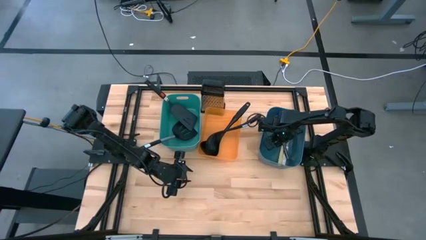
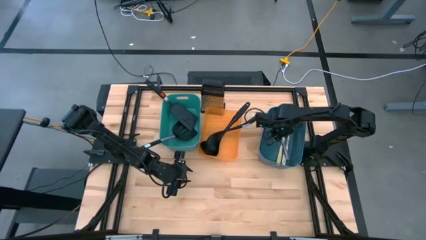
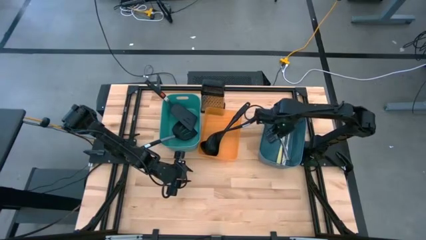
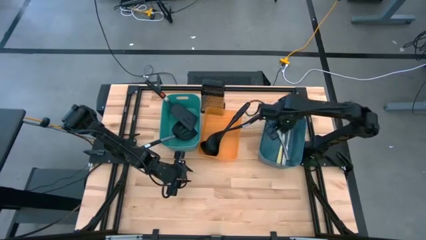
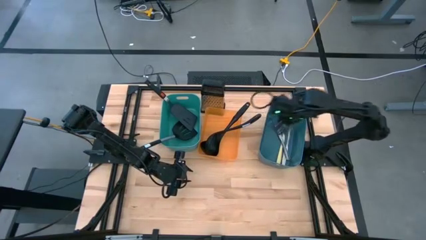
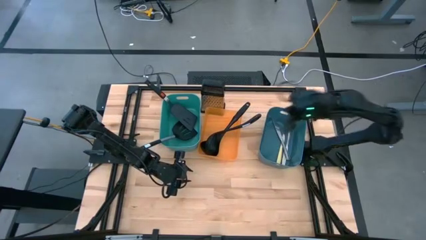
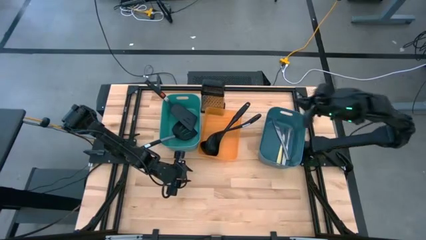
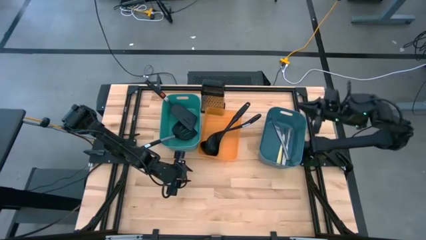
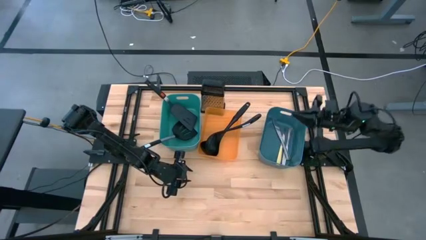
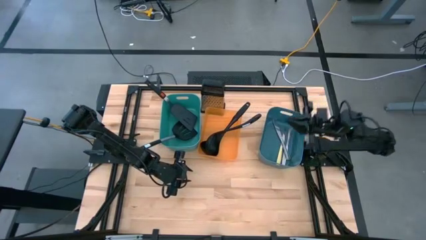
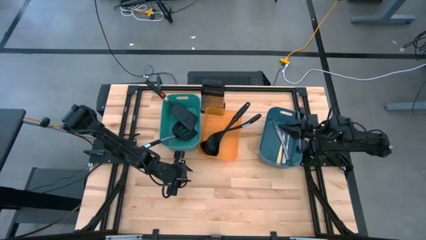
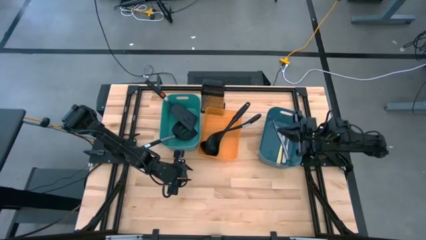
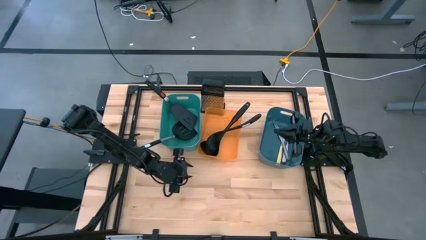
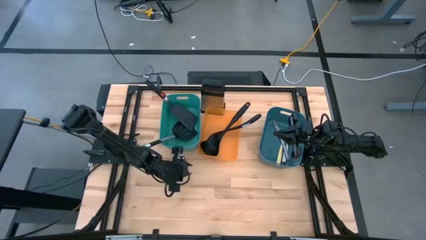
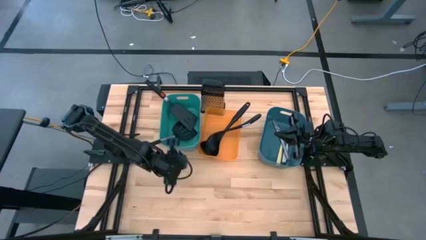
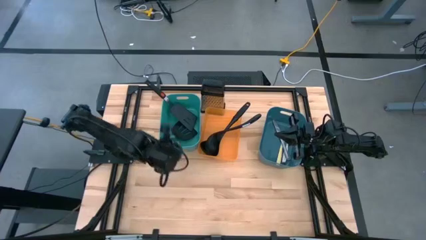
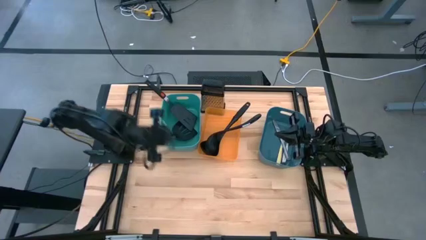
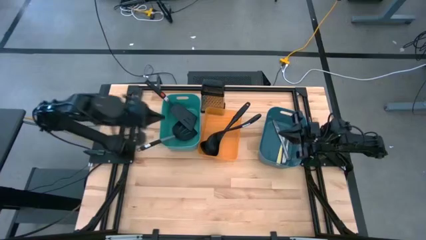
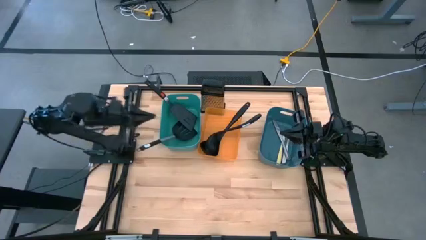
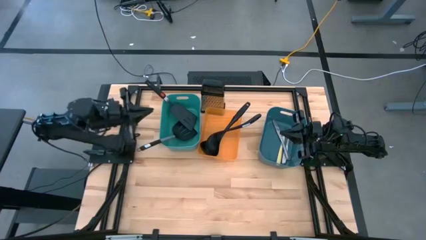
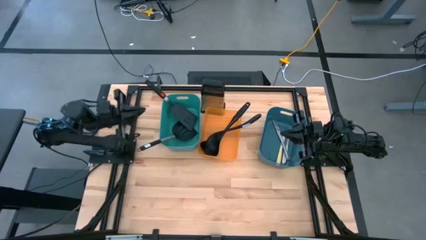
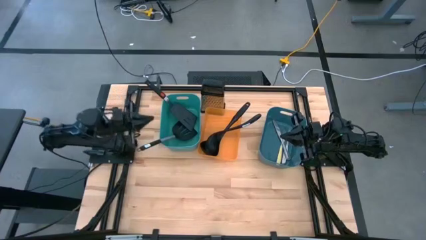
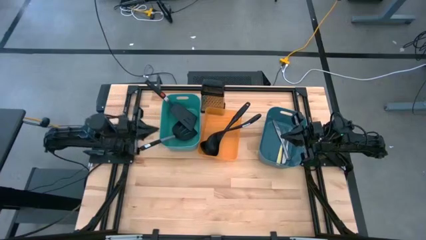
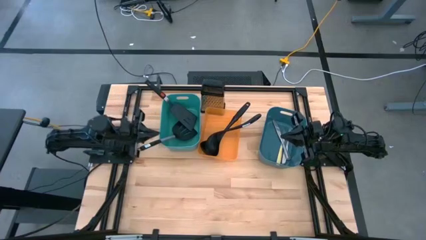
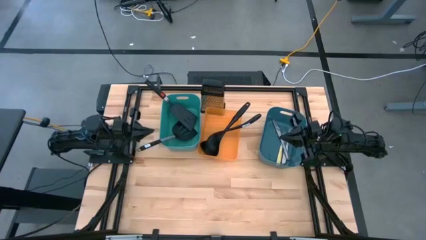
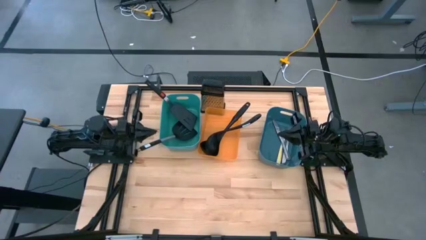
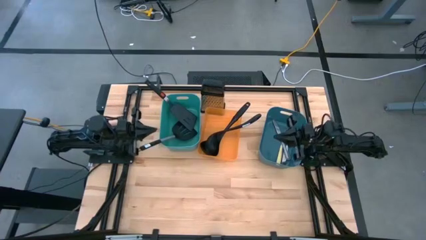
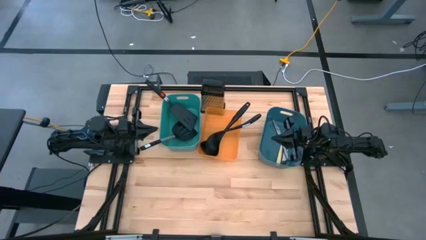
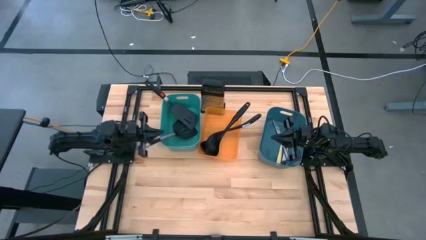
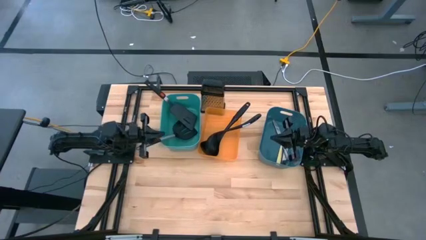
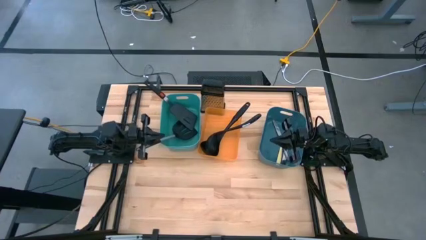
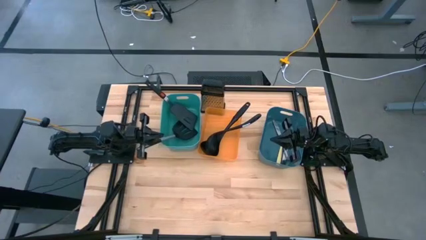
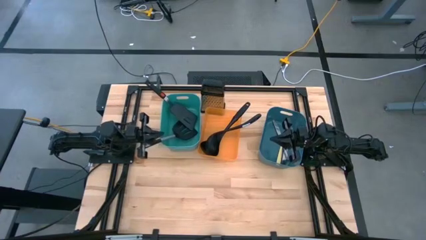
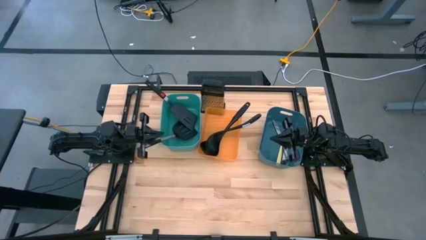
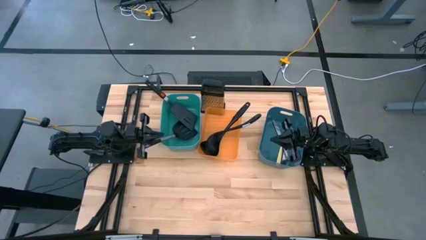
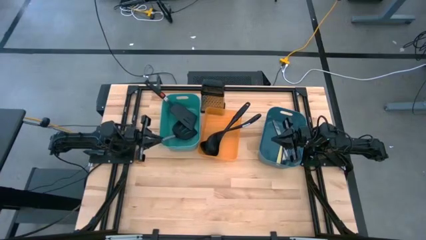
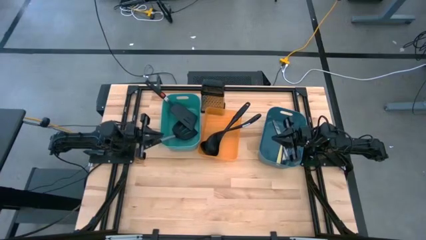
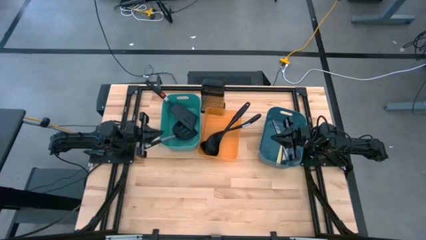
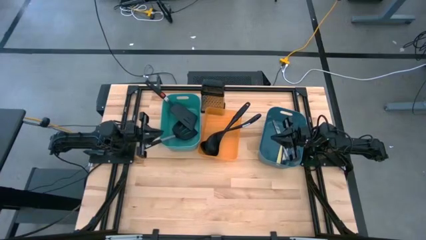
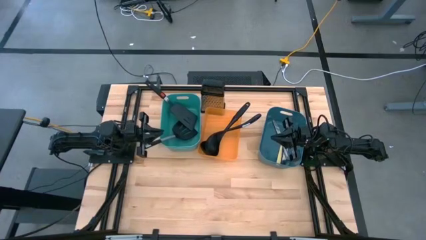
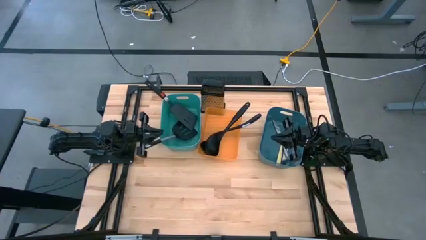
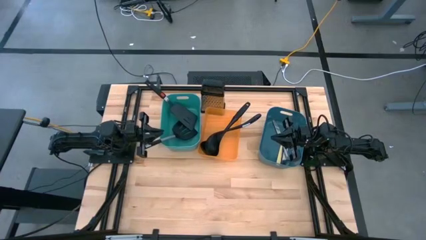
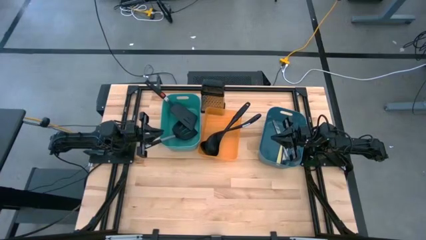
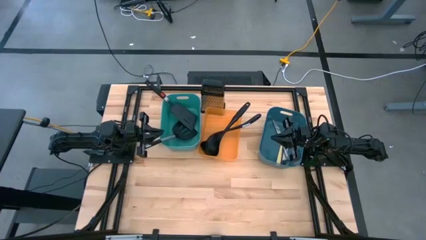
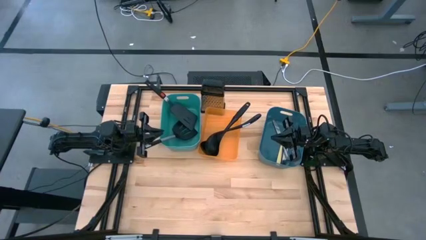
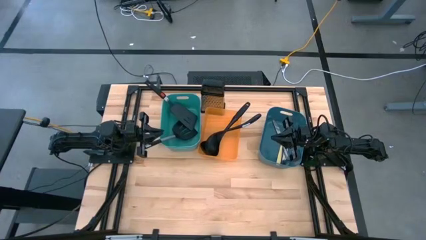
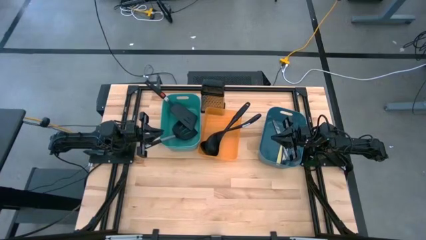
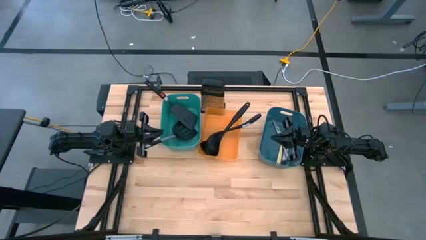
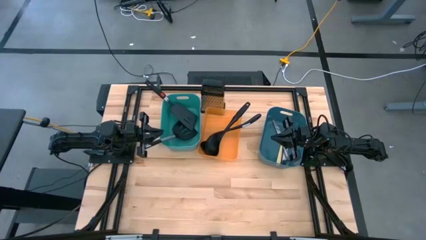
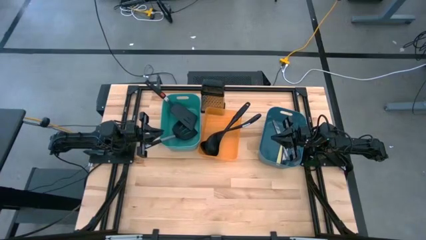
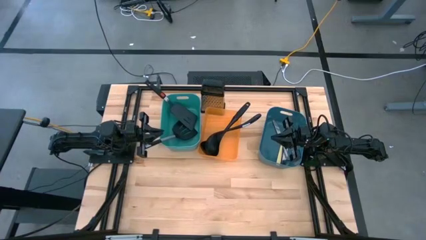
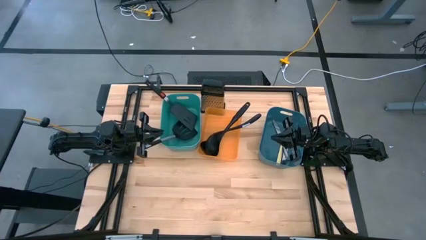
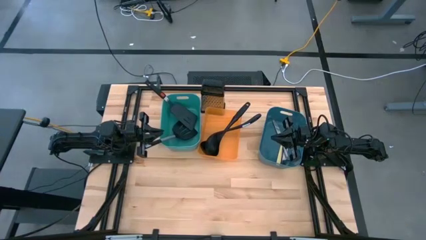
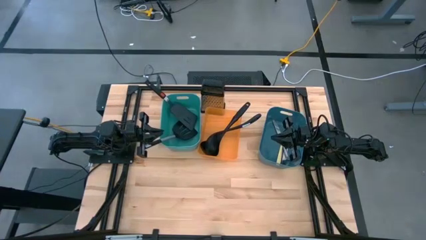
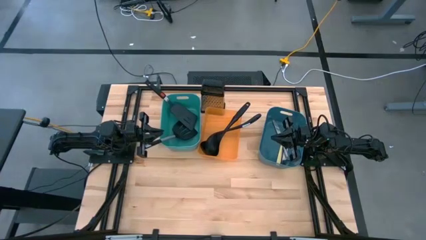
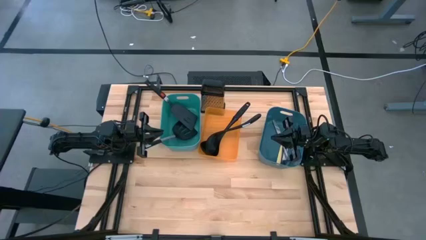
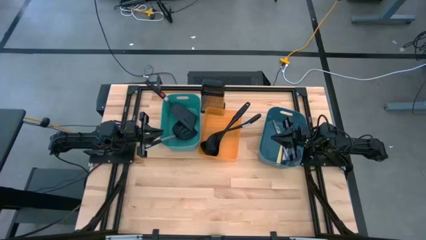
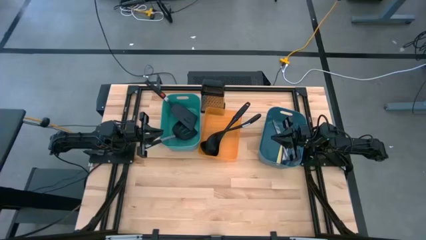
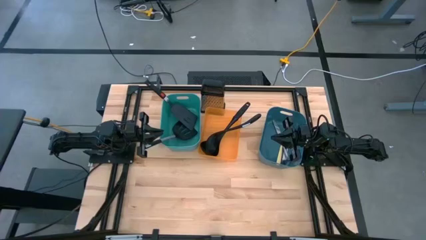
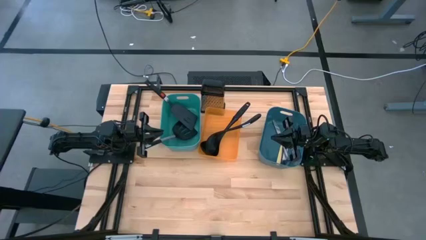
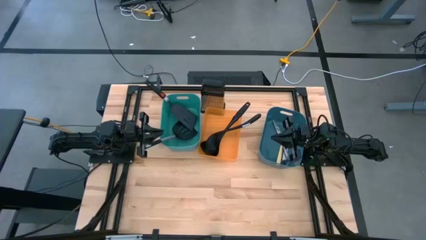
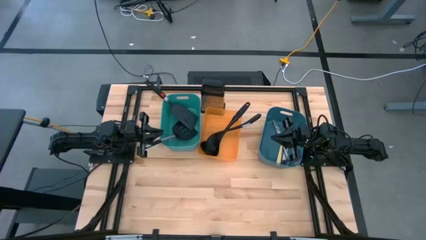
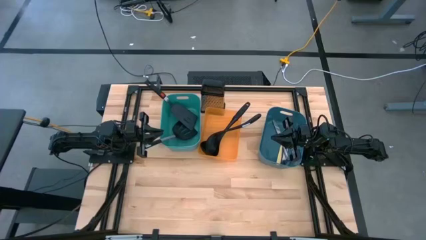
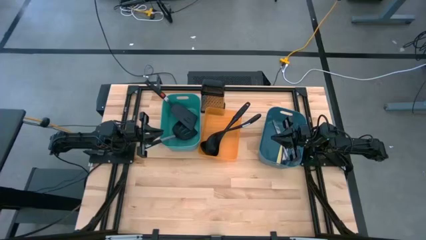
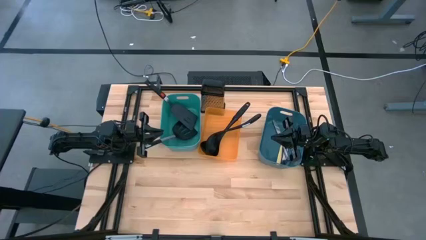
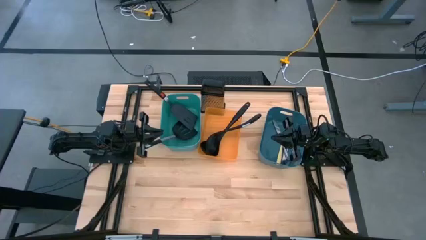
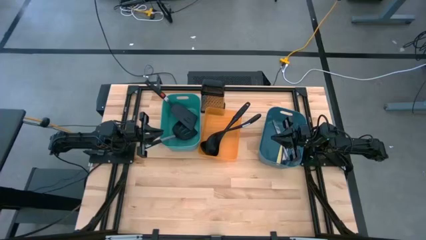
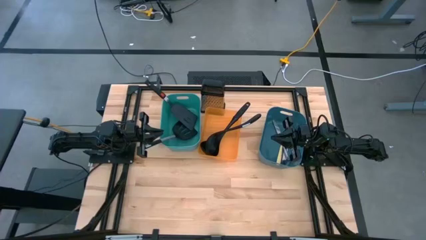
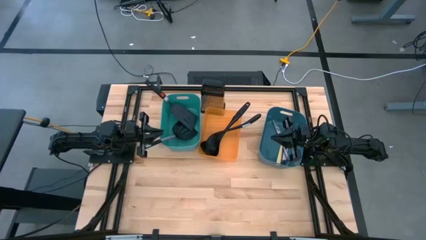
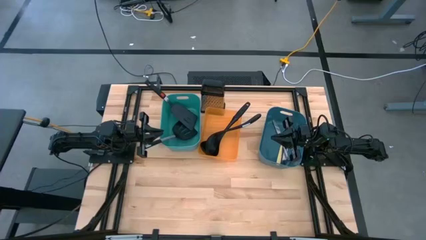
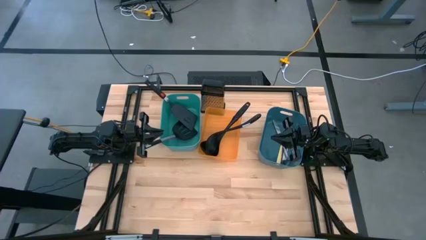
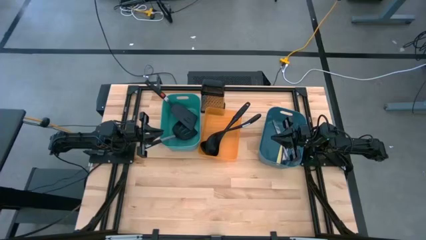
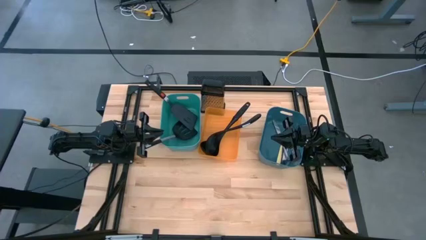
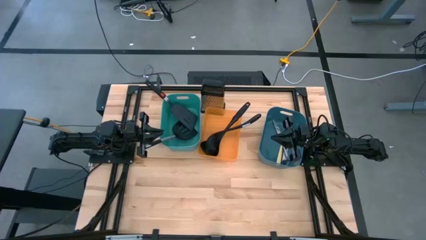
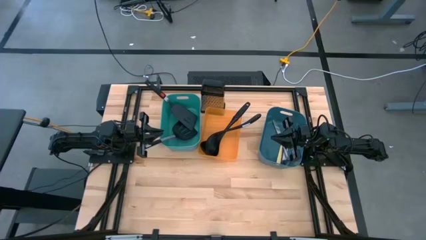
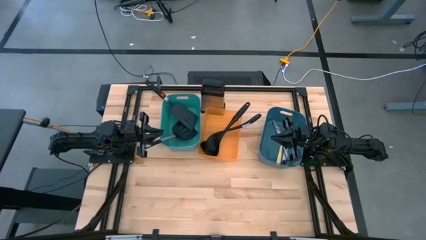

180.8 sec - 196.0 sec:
Task: Pick & Place Kitchen Items
Return to Home Position
